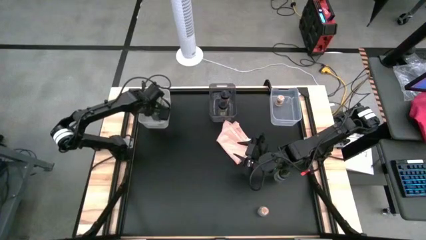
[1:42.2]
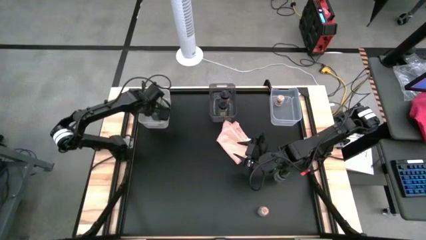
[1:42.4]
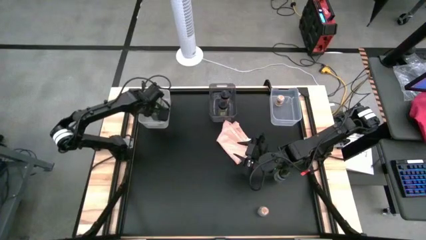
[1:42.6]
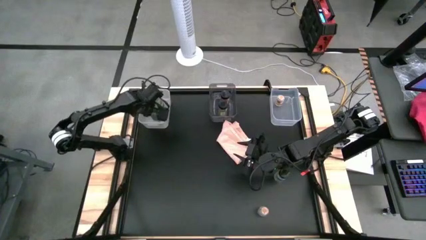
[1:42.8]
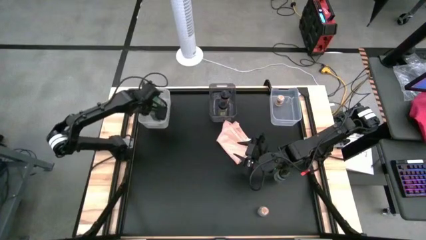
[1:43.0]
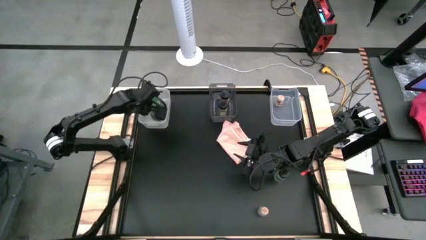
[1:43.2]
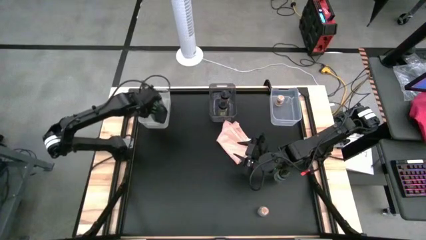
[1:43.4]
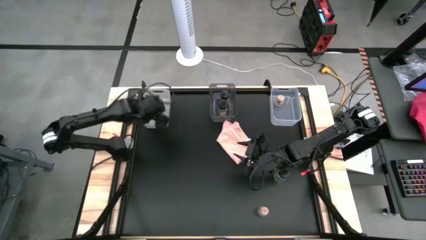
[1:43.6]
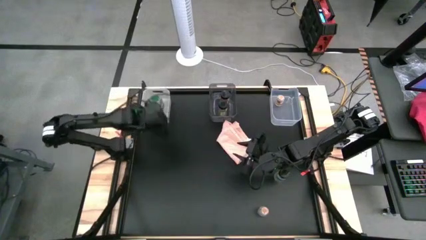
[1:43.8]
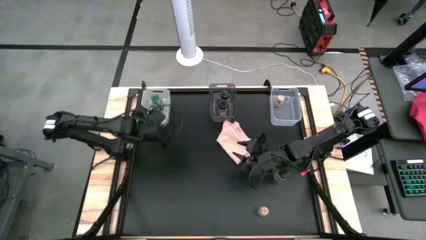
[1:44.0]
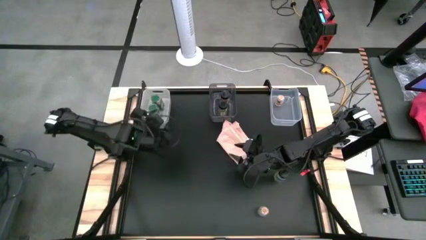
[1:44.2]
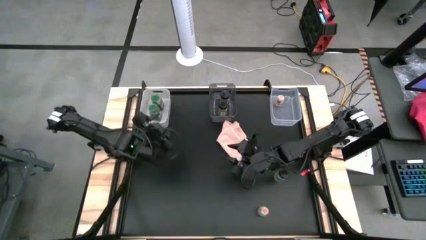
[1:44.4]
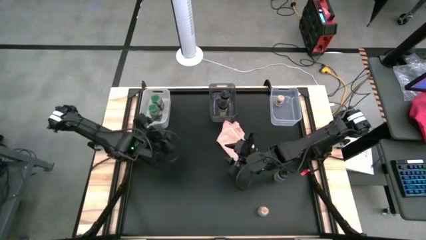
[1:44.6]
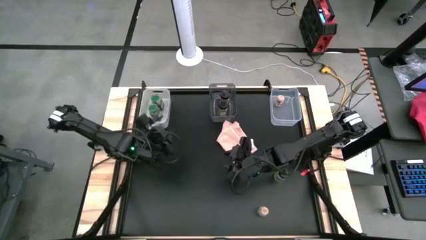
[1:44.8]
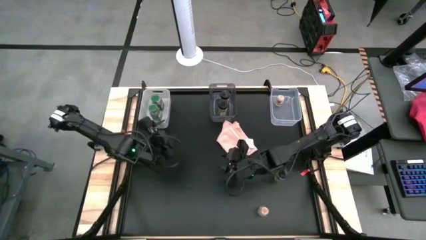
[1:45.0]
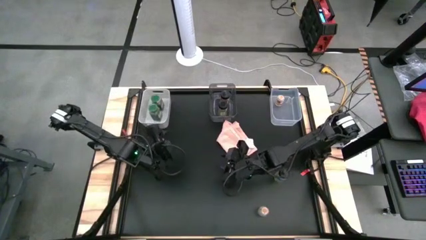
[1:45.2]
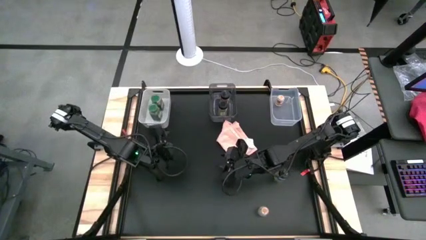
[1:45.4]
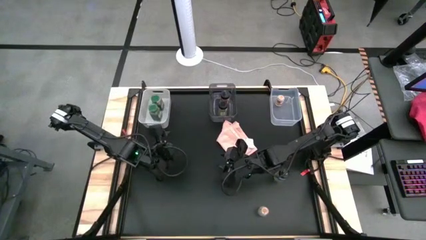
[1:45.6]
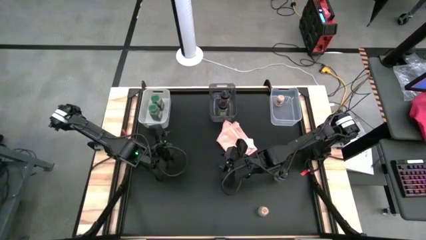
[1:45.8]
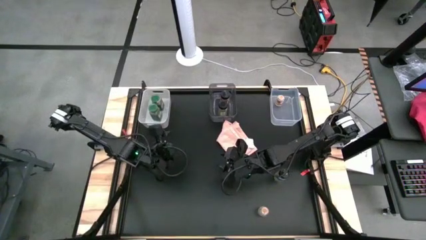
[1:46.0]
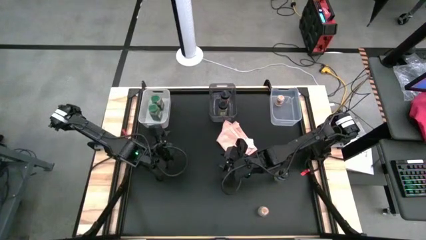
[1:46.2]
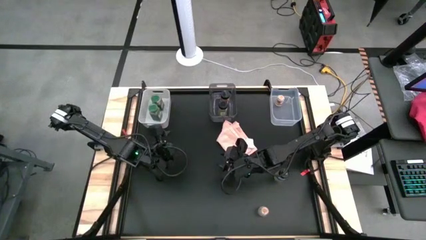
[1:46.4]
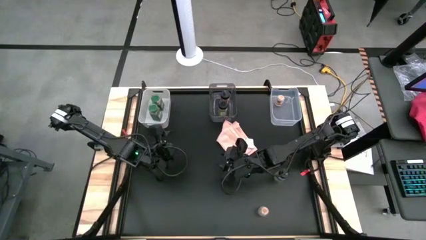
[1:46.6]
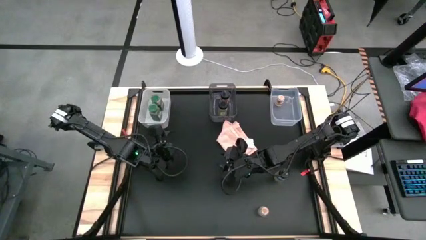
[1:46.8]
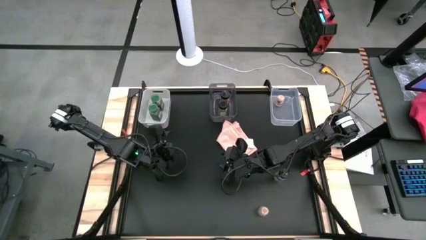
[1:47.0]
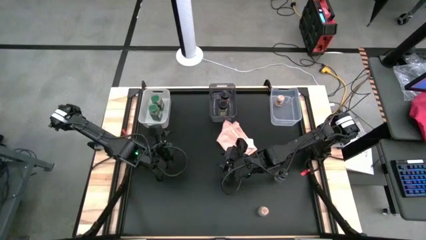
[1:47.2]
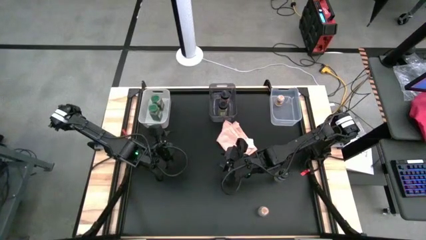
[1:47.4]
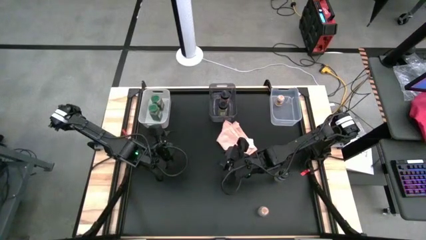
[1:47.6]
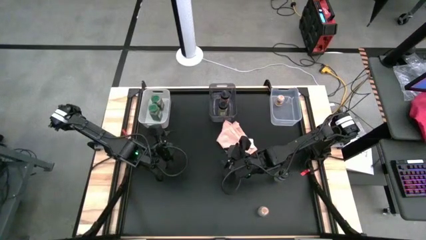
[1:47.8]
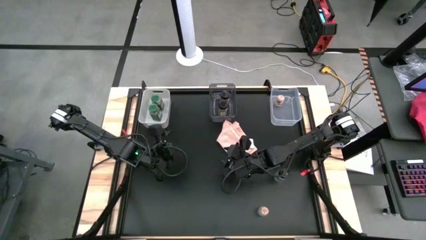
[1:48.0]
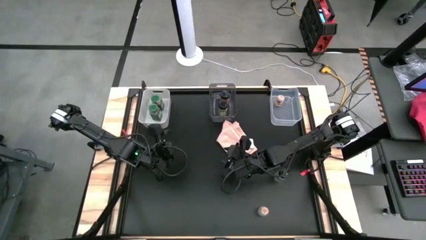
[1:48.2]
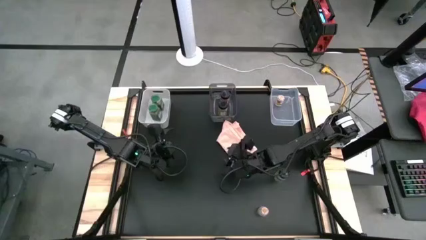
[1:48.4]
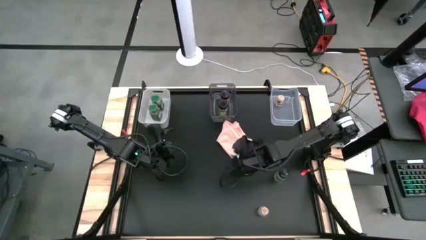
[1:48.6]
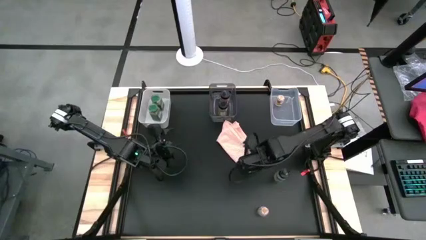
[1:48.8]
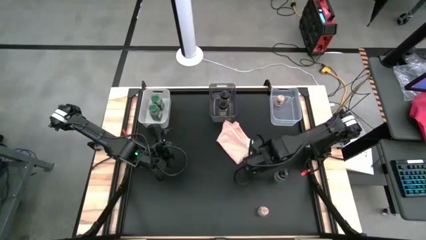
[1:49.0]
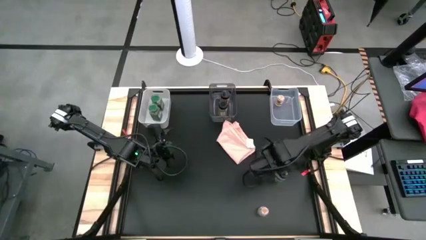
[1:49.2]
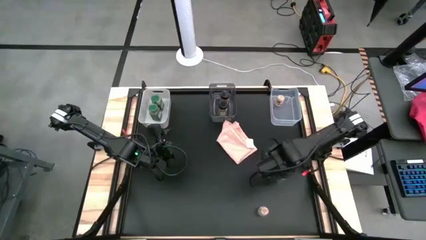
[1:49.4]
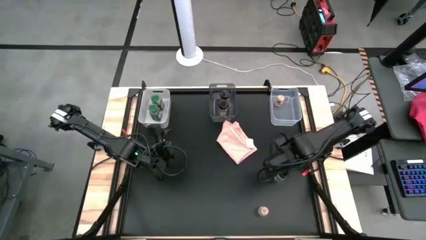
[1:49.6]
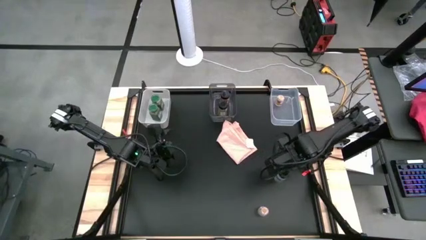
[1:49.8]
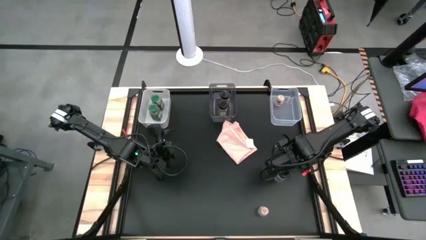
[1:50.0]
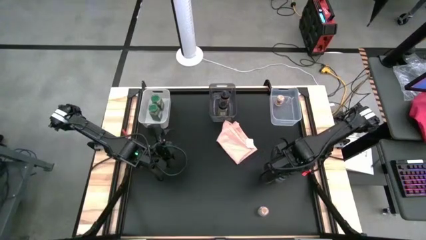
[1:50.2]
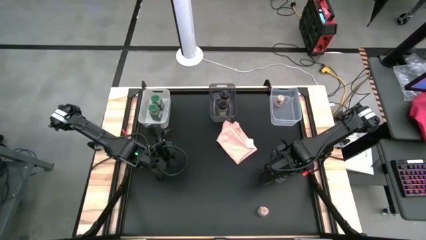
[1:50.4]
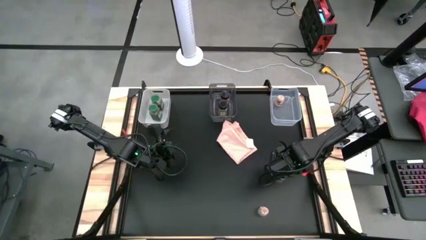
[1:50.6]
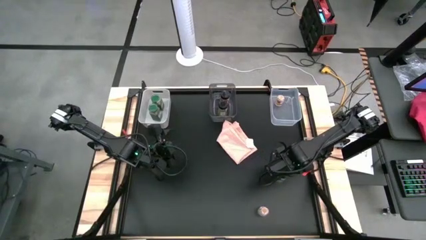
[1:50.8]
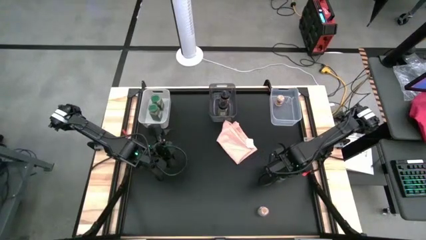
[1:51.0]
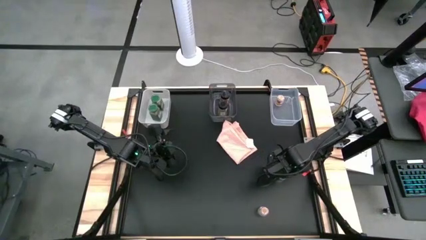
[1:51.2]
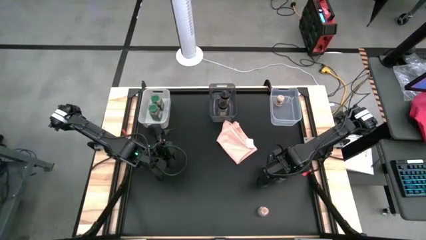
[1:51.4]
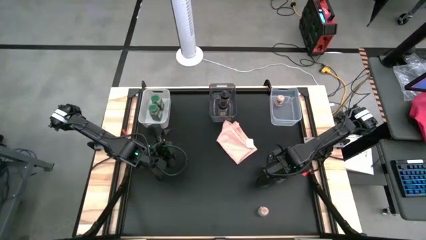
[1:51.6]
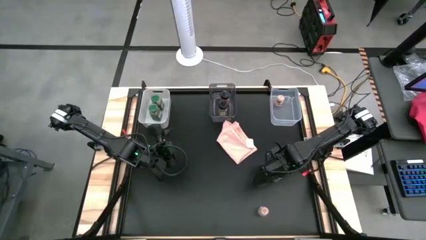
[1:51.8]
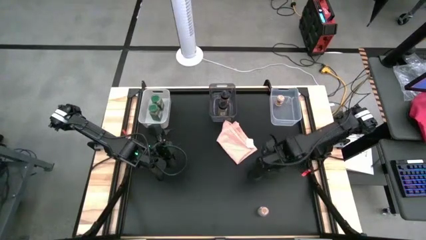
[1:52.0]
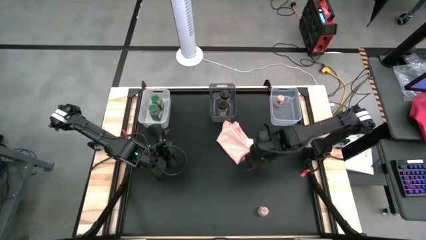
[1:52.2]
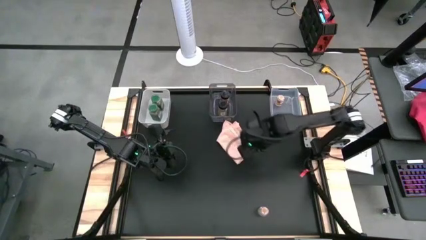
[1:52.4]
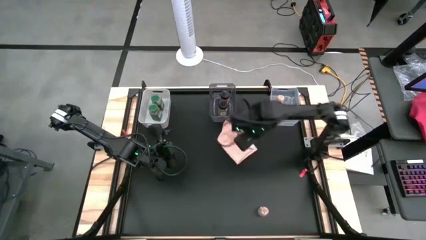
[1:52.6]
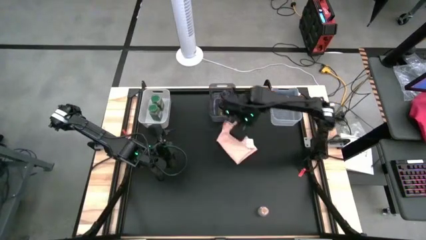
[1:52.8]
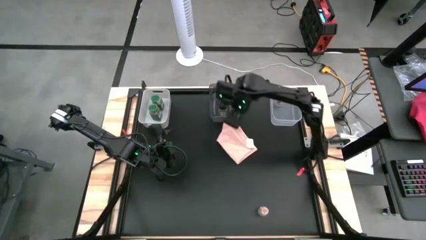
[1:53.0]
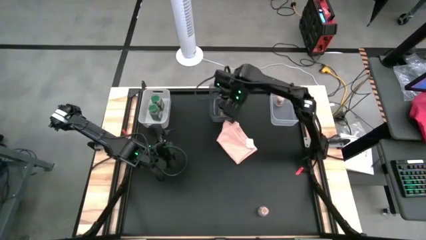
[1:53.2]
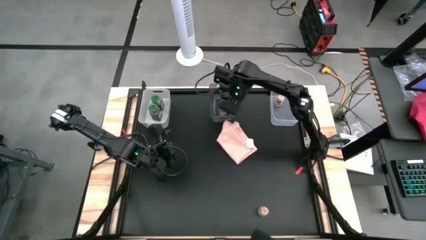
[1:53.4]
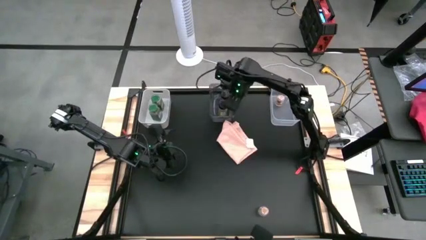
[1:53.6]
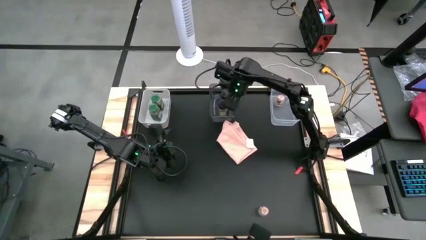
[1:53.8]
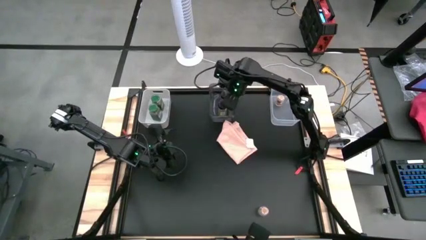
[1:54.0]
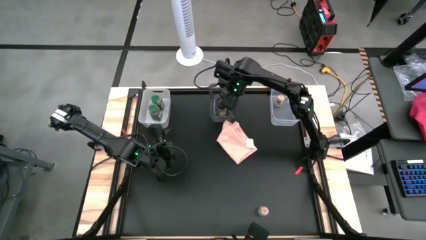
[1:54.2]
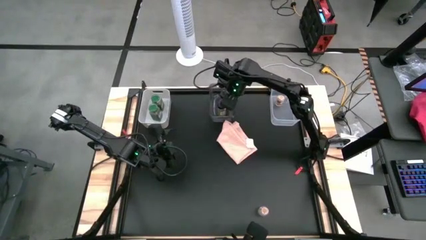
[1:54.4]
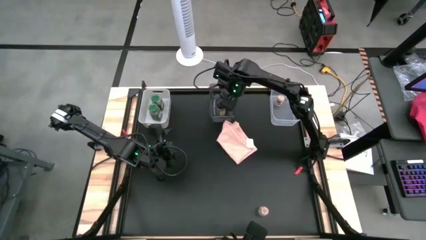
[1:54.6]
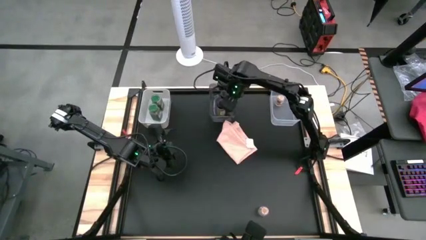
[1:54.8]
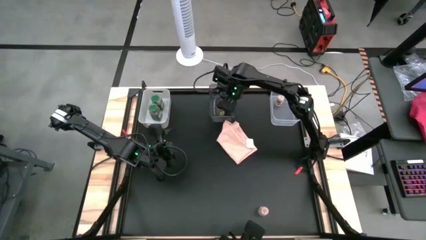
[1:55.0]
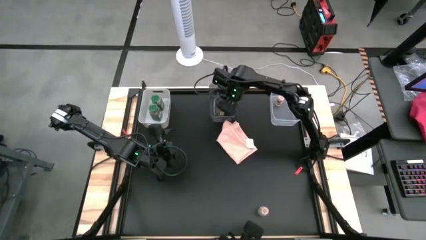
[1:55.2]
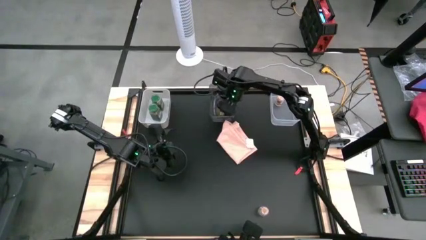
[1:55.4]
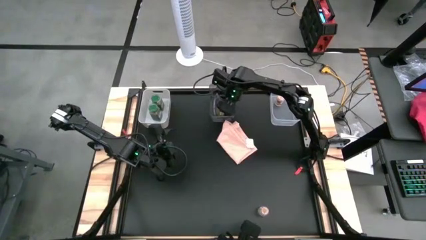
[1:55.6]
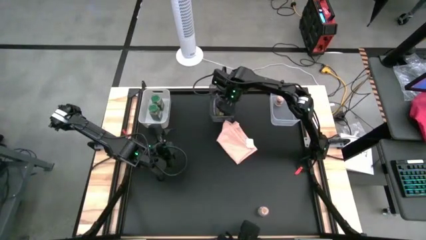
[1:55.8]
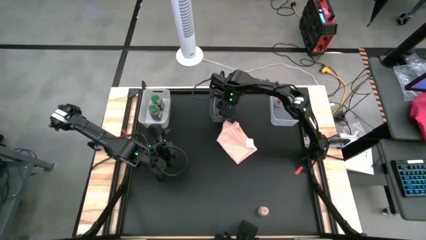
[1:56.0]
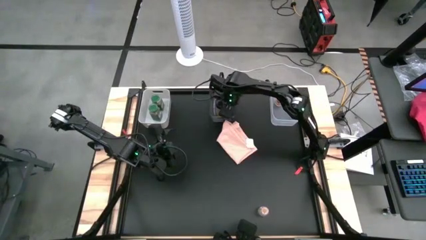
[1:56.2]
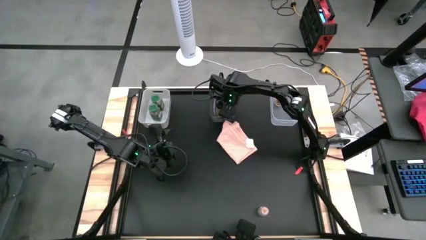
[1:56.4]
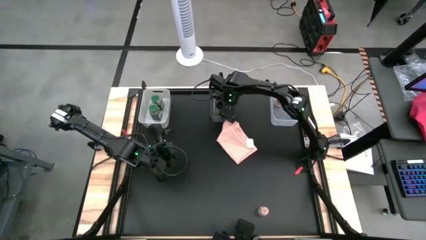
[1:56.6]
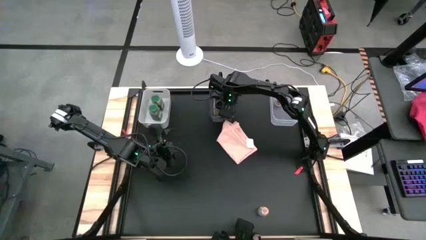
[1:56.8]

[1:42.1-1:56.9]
Task: Sort spices by type
Put the black seasoning bottle into the black bin
